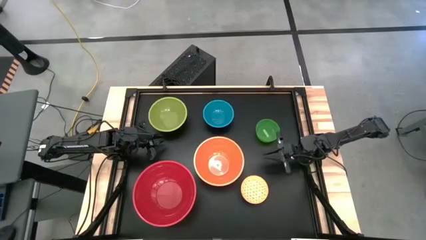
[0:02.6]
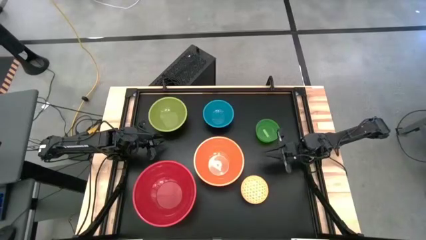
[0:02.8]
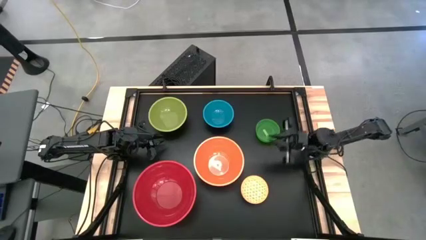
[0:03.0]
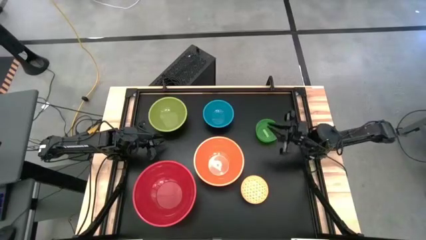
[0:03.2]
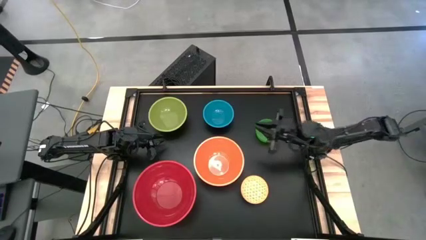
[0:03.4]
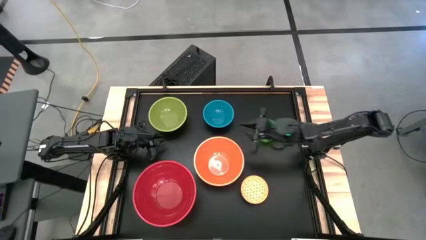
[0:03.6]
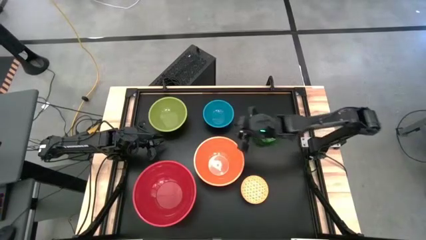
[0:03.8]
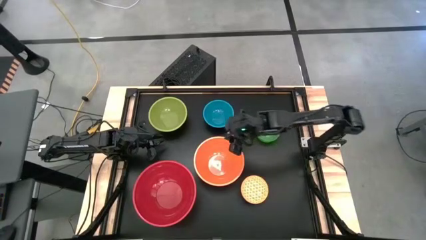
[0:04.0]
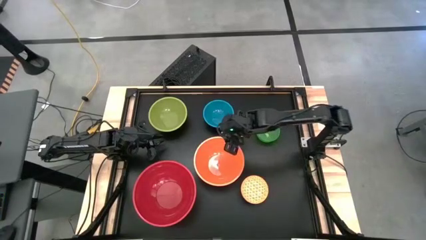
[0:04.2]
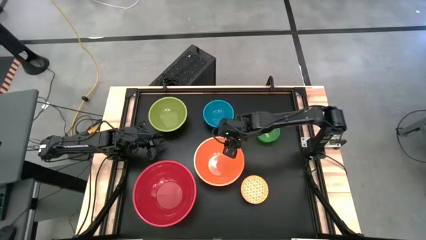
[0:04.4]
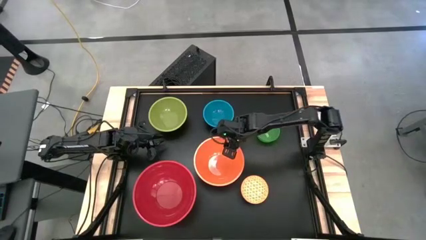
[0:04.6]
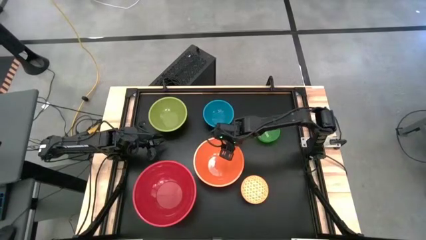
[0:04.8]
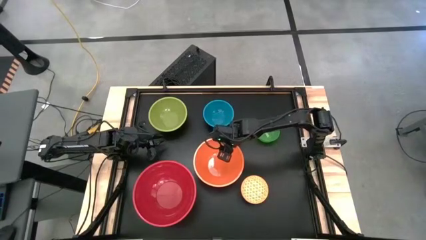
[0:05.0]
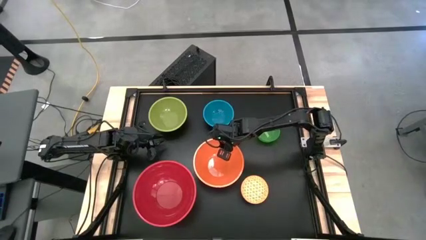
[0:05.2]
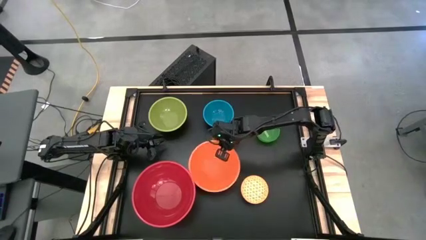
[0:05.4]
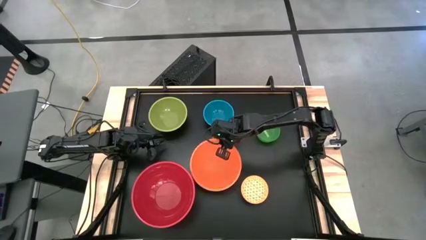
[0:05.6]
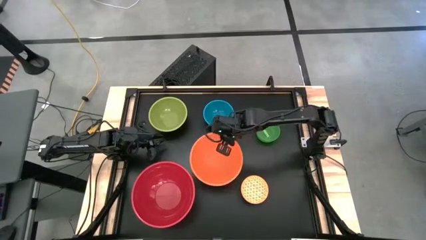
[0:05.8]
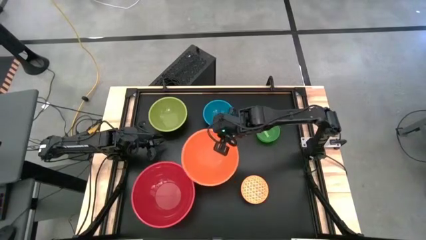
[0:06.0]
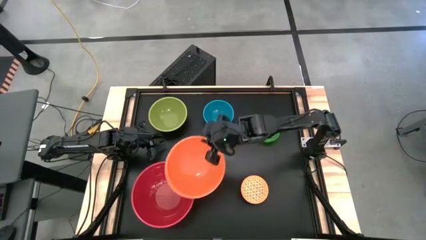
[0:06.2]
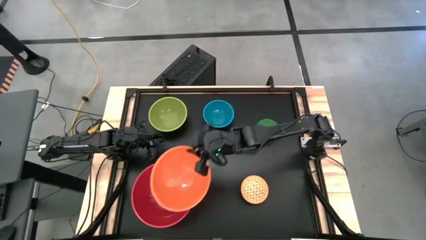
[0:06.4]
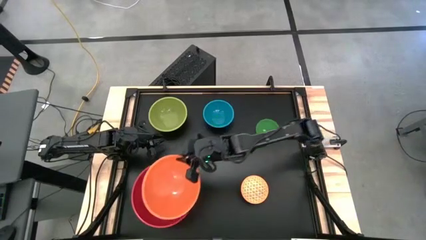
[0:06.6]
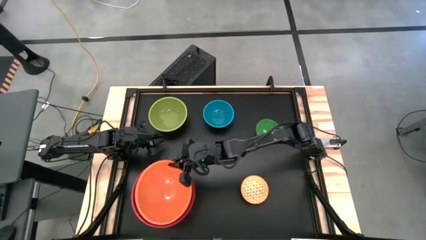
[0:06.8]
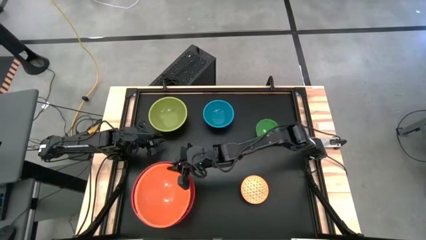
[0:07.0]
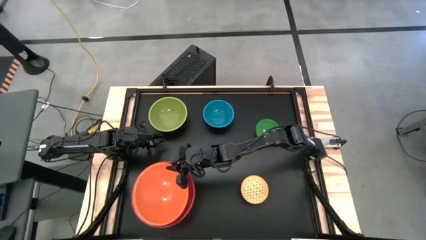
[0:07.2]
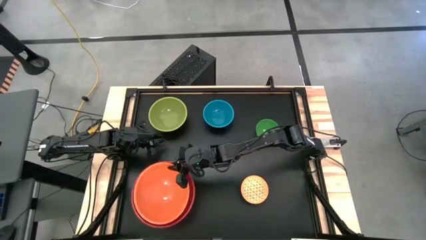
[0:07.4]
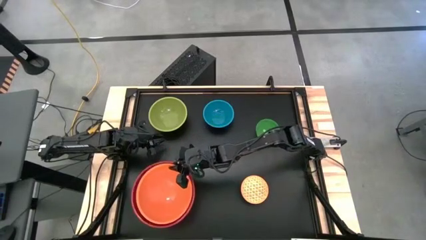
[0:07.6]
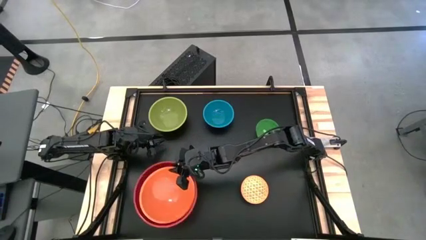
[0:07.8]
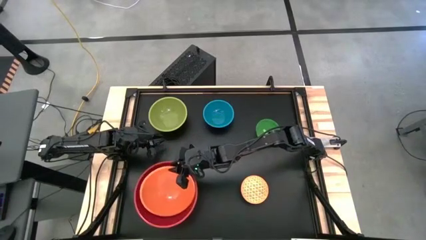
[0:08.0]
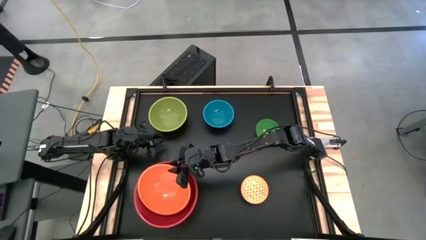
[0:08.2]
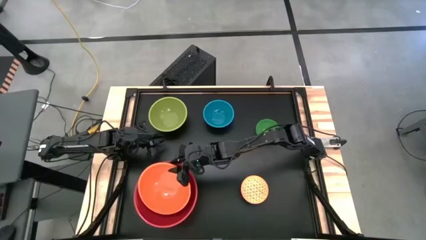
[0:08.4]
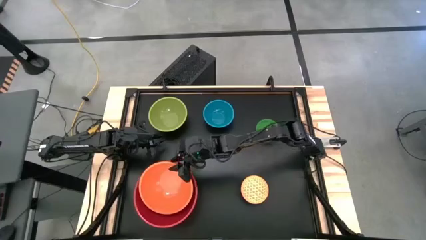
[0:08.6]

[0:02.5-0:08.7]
Stack the orange bowl on top of the red bowl

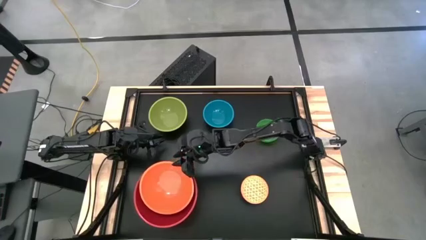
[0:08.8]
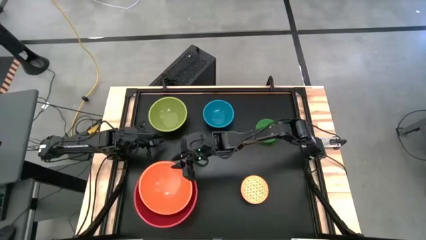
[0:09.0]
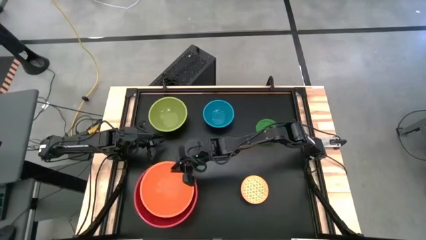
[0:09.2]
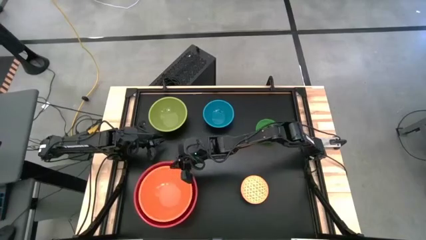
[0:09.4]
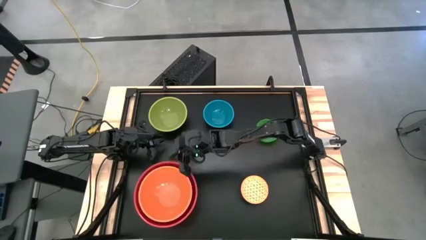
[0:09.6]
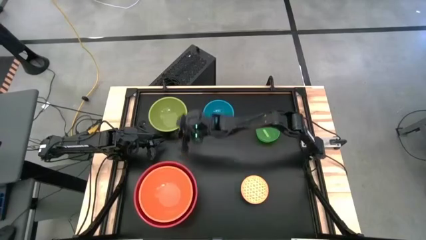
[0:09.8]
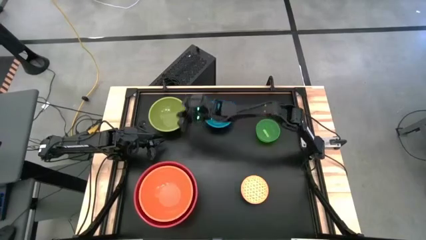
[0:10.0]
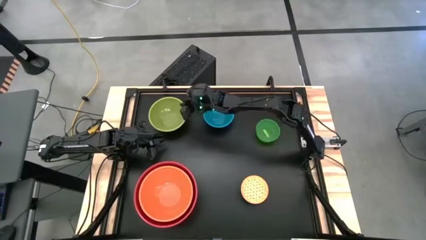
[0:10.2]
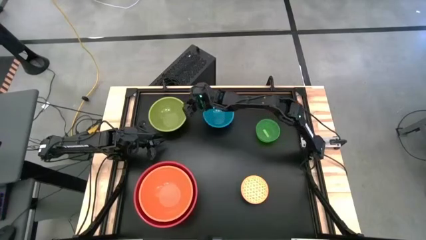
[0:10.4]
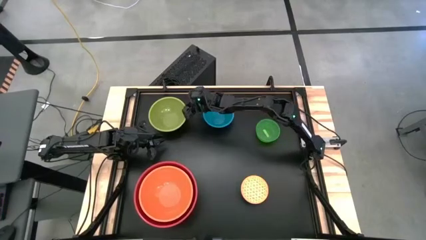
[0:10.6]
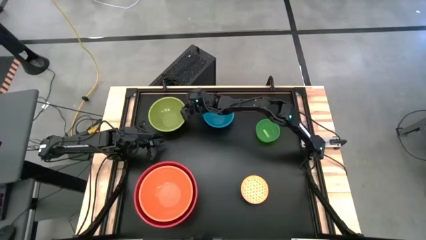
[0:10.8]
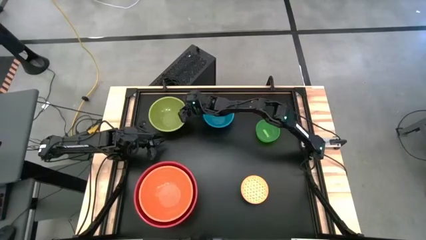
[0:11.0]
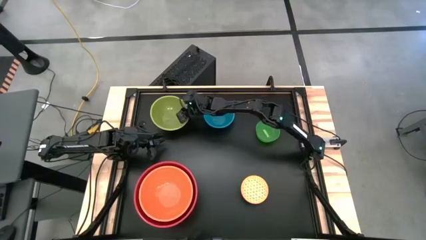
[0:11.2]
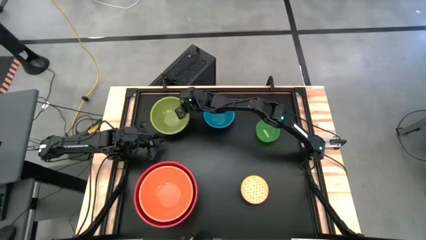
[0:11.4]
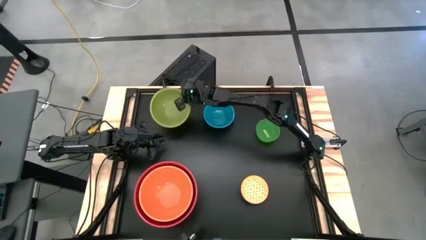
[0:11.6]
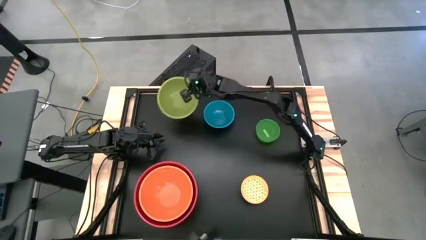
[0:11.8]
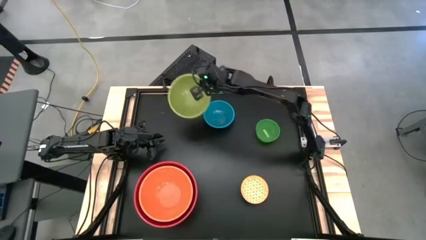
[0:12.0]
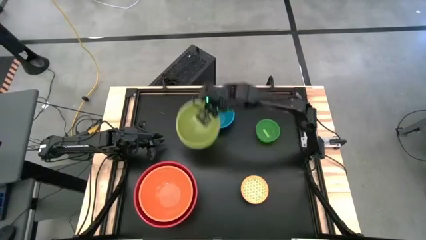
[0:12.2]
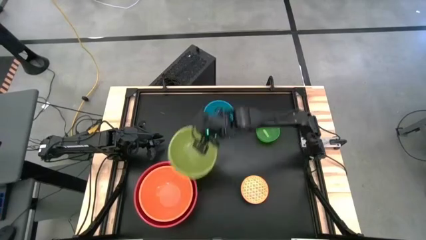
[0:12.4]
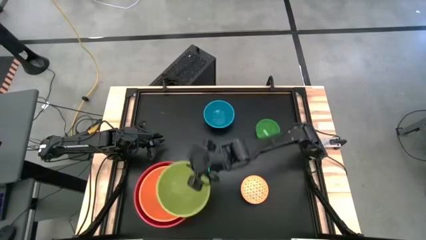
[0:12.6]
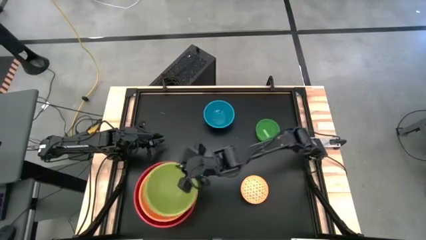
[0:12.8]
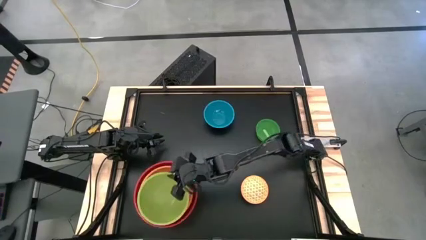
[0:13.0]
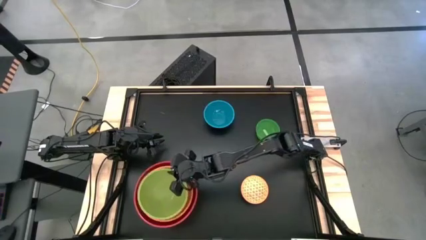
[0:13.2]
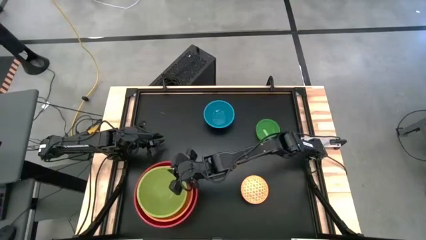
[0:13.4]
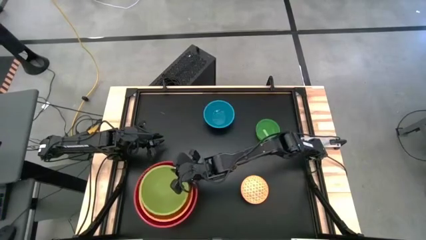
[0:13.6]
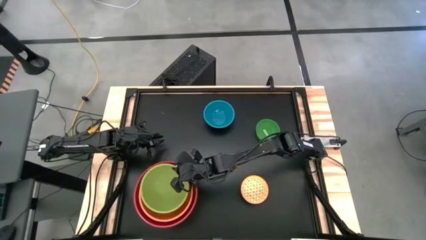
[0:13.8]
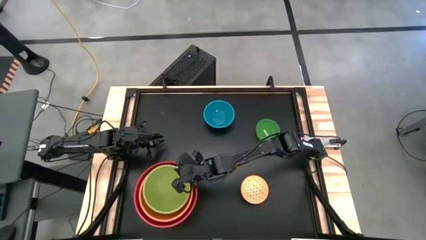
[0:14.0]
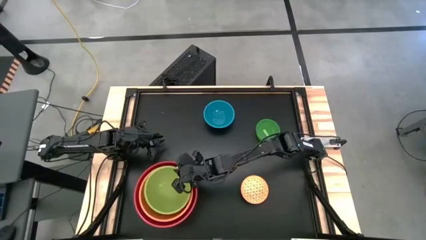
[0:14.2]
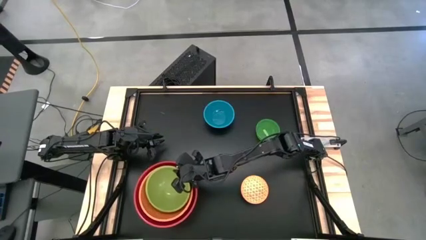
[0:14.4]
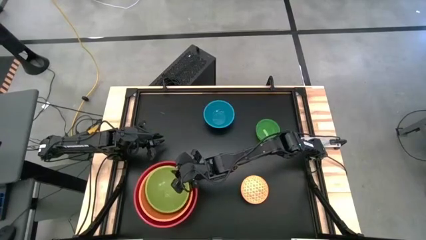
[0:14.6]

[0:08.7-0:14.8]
Stack the left green bowl on top of the orange bowl

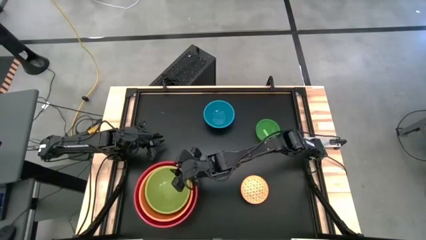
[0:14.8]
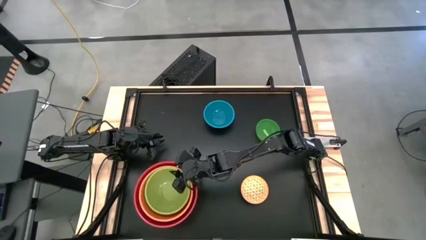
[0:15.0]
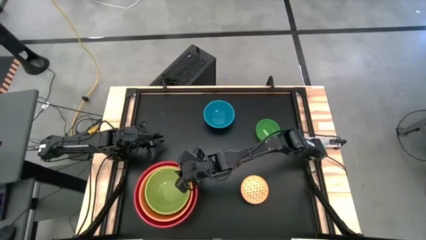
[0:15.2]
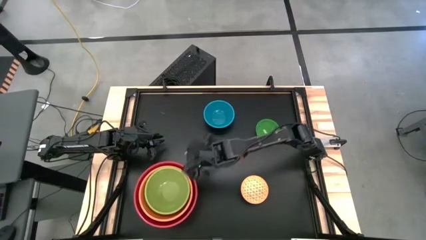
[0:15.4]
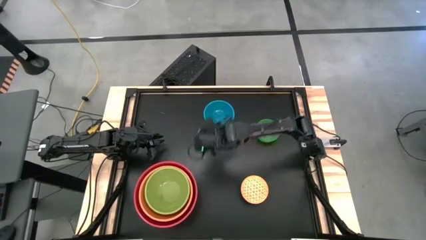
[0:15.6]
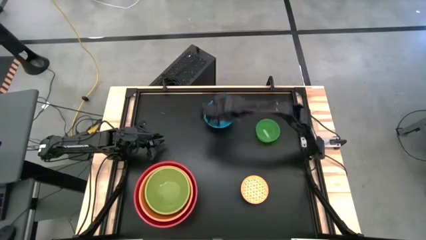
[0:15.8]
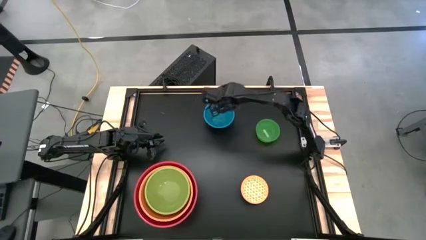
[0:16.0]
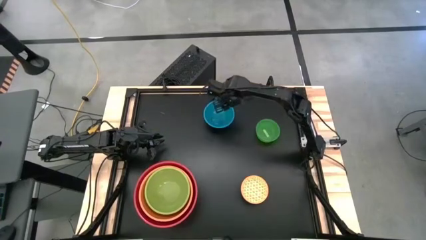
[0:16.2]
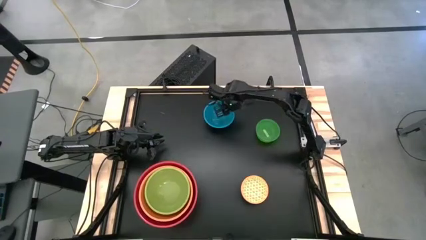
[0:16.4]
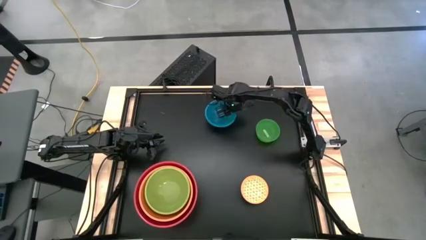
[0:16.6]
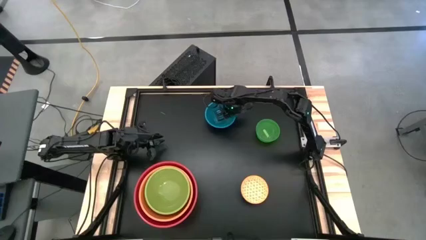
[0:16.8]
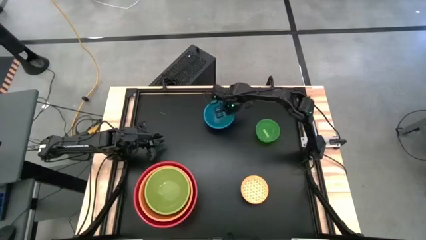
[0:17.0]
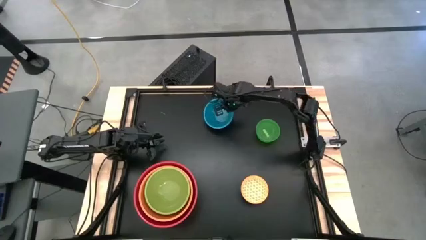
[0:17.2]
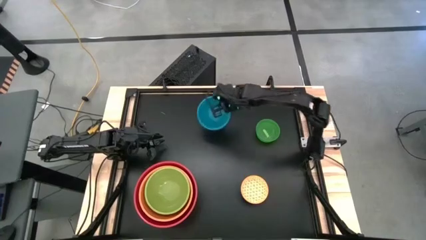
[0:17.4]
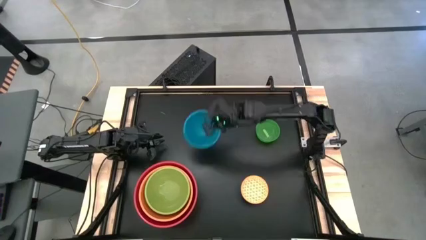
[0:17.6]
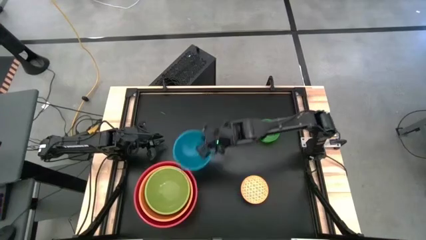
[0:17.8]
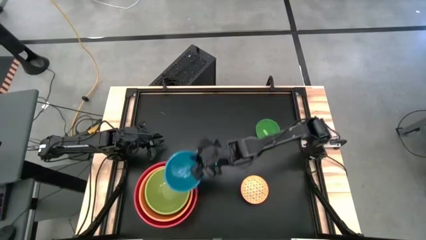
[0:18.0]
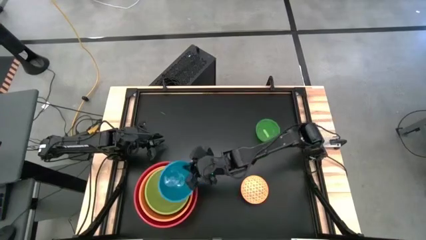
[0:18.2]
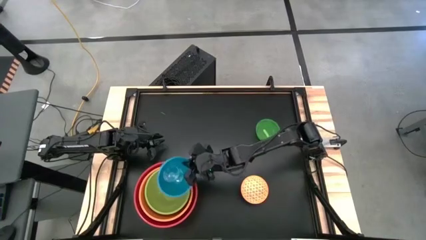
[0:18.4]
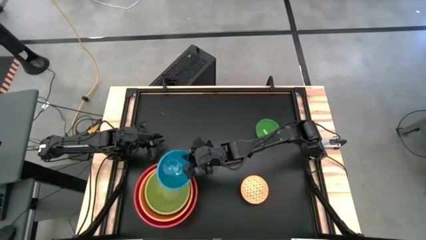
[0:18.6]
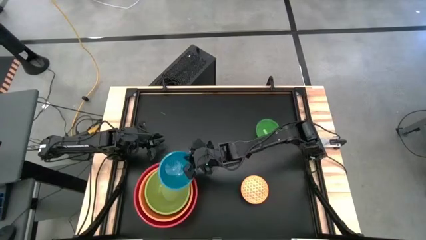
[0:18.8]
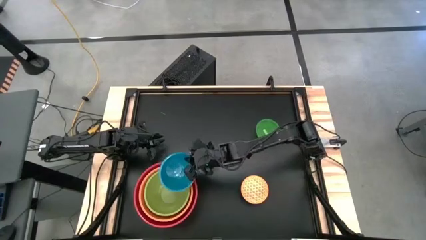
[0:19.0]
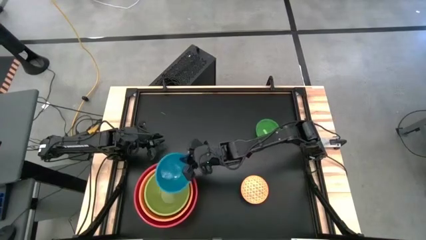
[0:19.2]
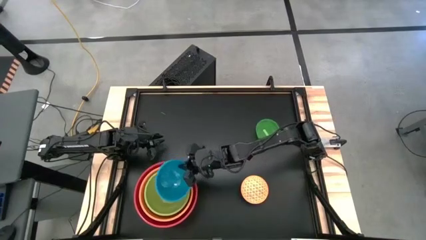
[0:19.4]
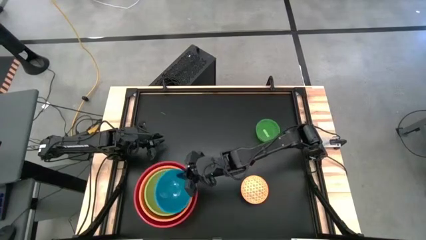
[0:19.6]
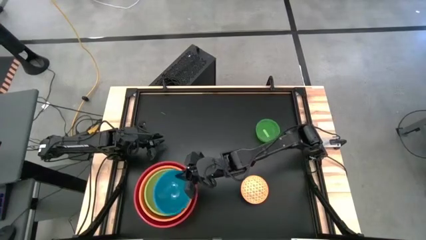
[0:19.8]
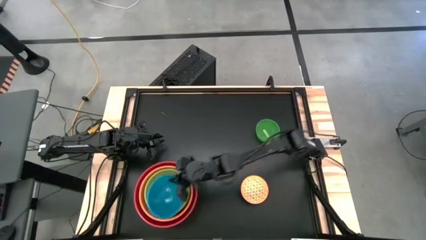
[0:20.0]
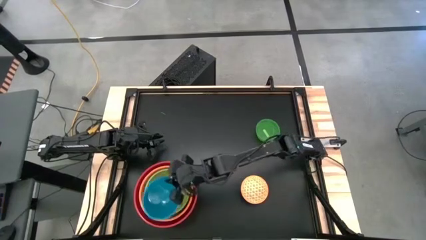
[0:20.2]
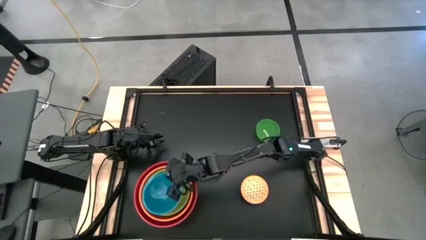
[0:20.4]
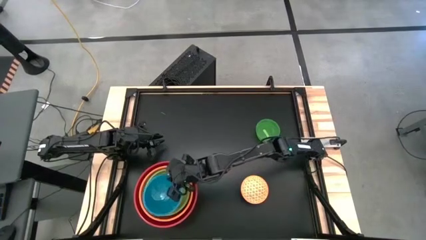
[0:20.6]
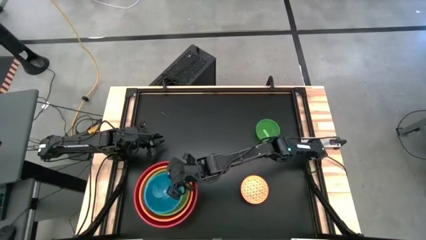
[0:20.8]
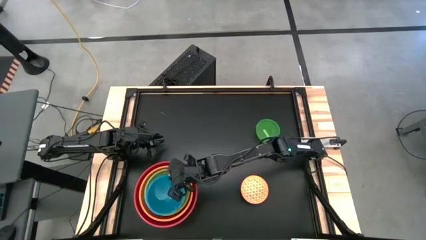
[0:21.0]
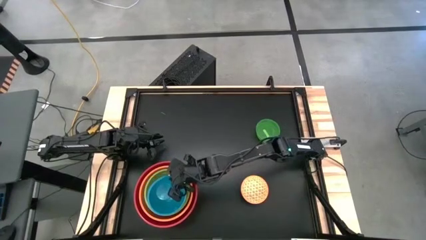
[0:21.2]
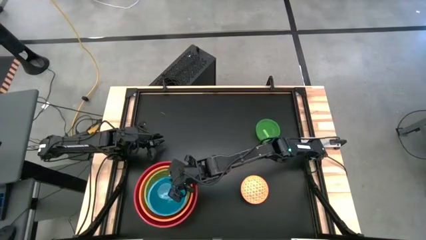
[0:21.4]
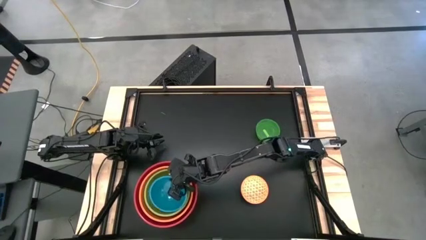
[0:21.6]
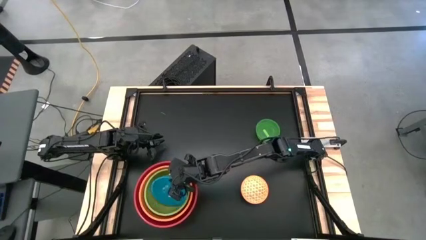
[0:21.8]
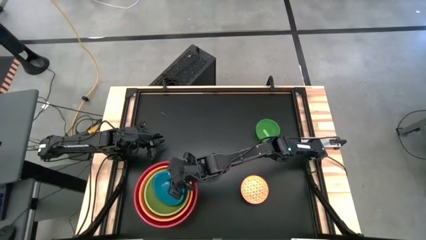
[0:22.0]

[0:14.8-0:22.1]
Stack the blue bowl on top of the green bowl
